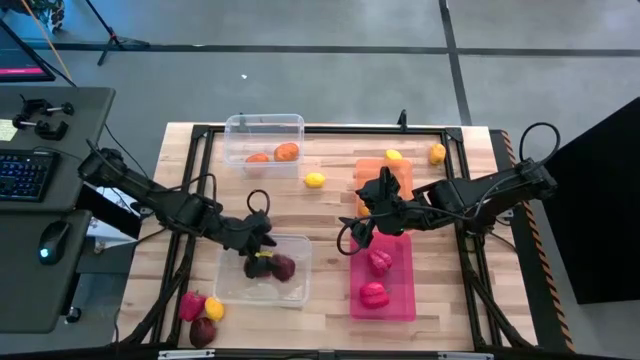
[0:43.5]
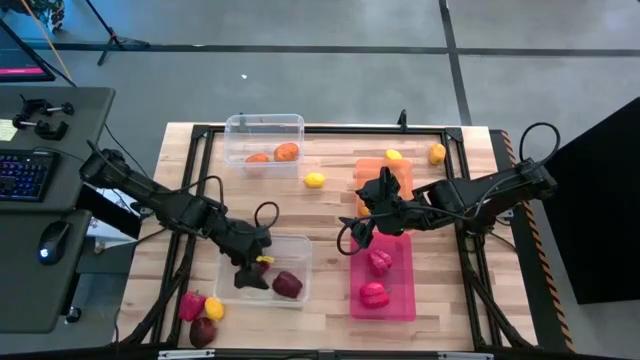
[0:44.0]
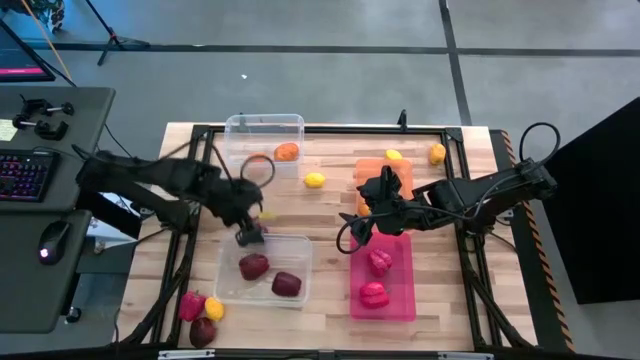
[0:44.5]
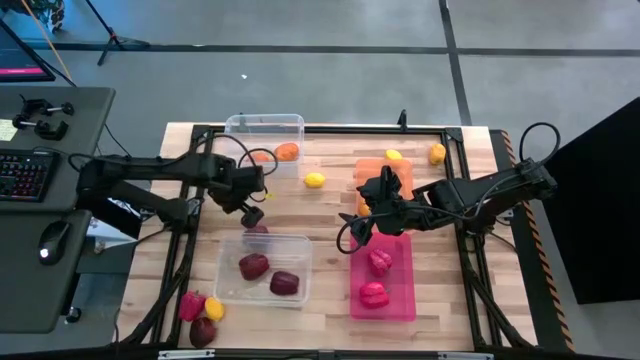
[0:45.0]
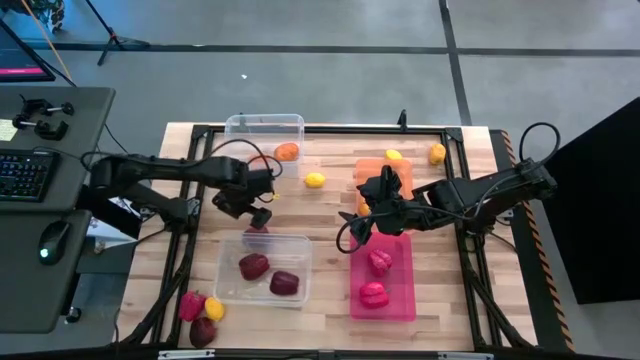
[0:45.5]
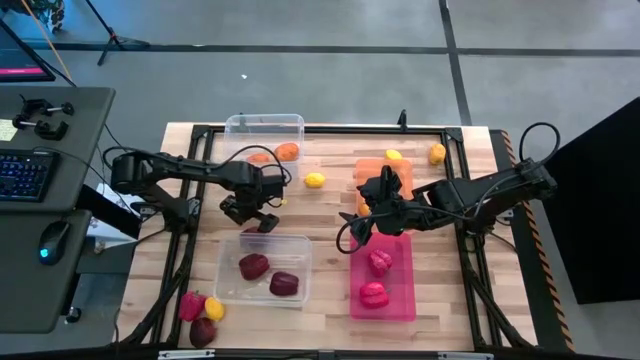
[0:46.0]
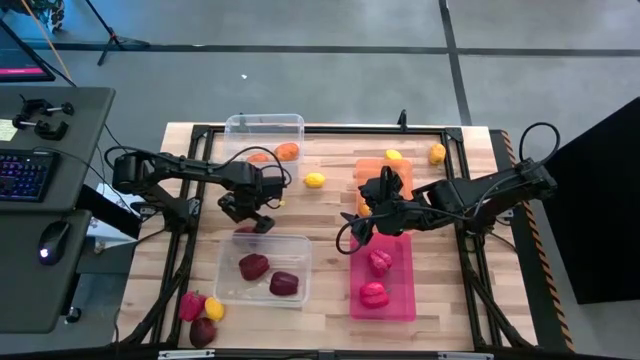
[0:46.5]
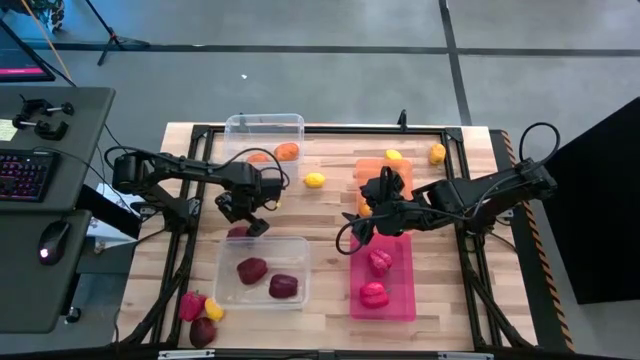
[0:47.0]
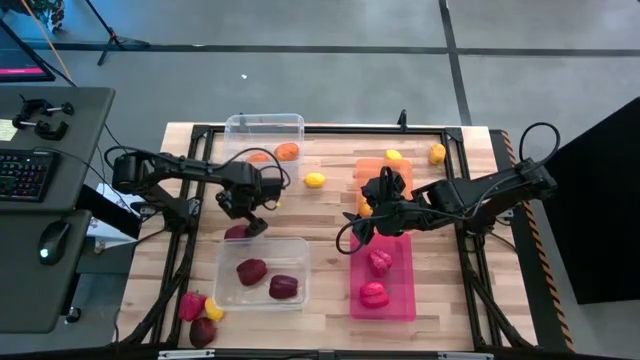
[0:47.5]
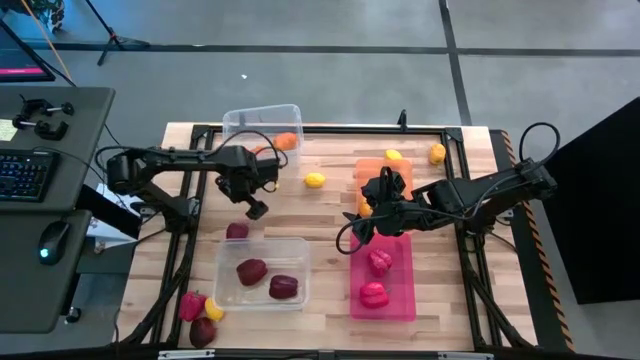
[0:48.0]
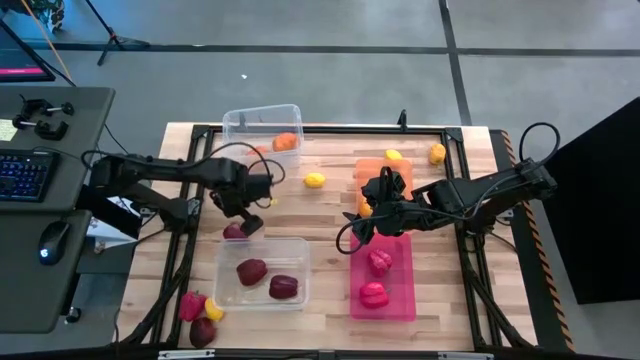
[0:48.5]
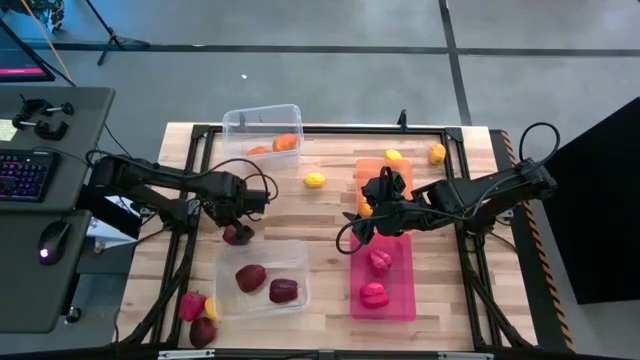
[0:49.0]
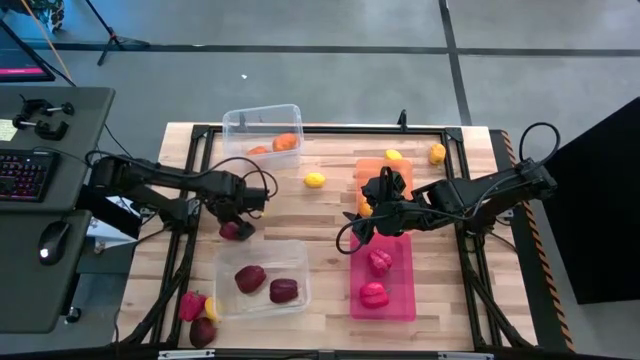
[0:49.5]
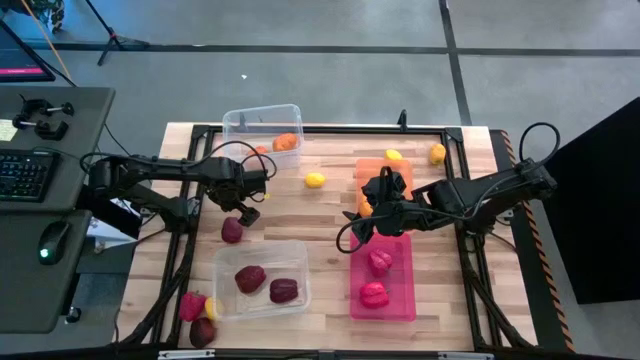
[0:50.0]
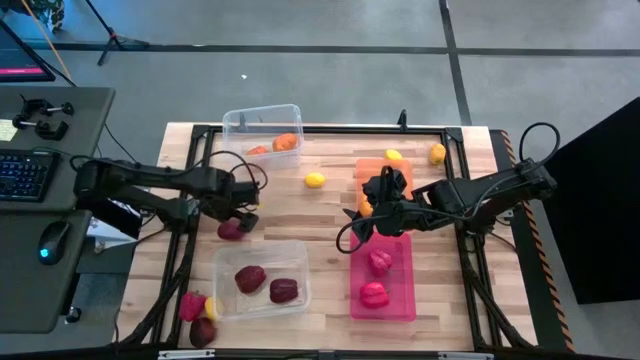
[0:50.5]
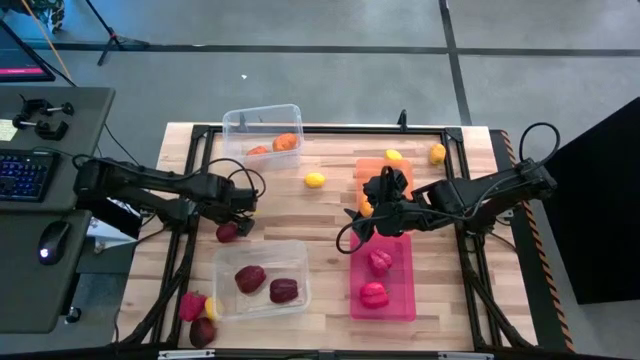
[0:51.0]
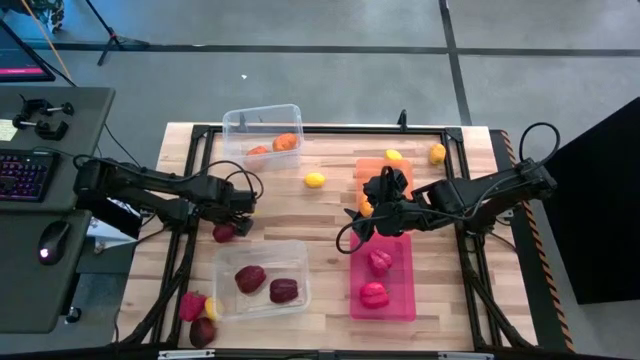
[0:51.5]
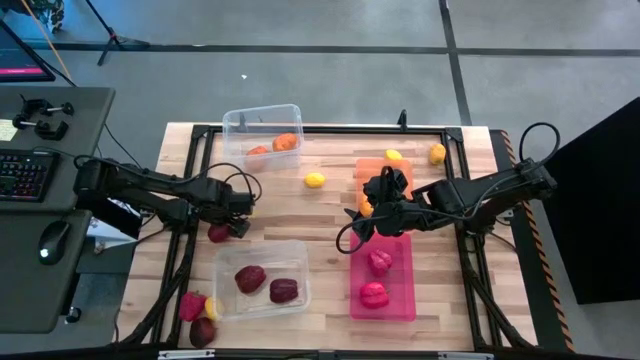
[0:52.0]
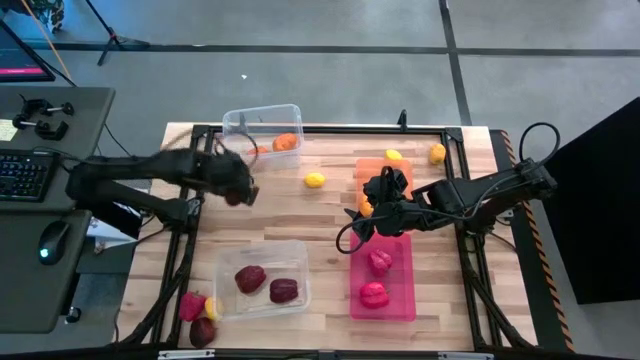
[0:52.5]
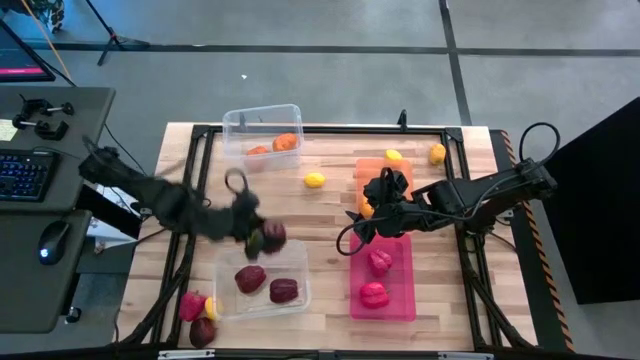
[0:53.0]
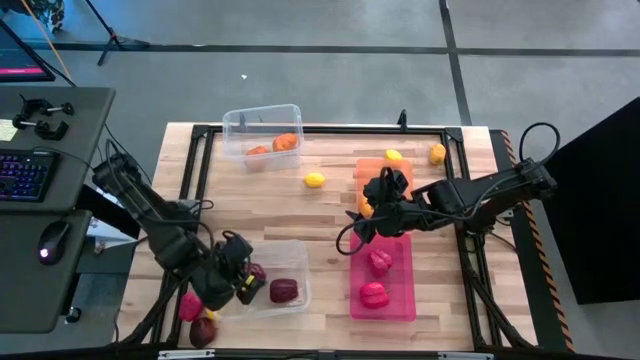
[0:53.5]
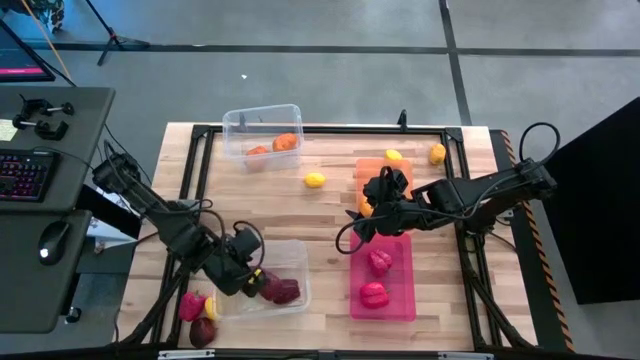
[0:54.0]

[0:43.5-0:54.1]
Task: Sort produce into baskets
Put the red apple into the bottom transparent bin

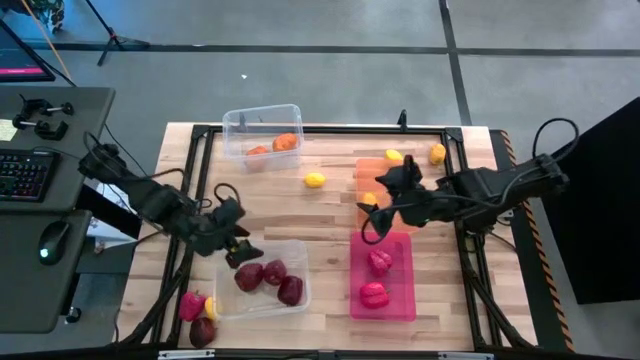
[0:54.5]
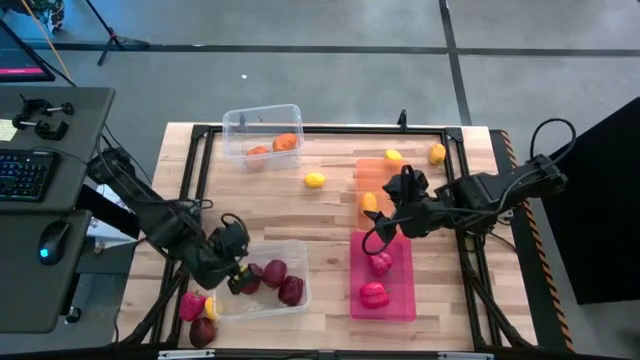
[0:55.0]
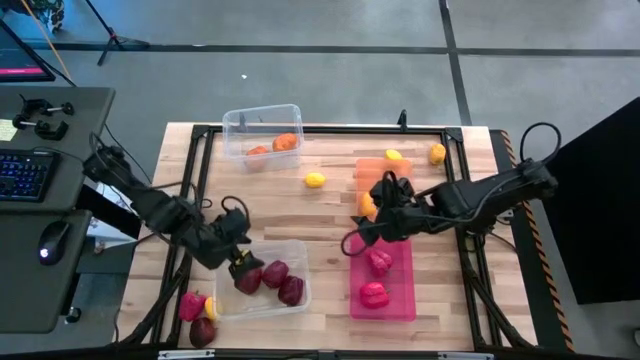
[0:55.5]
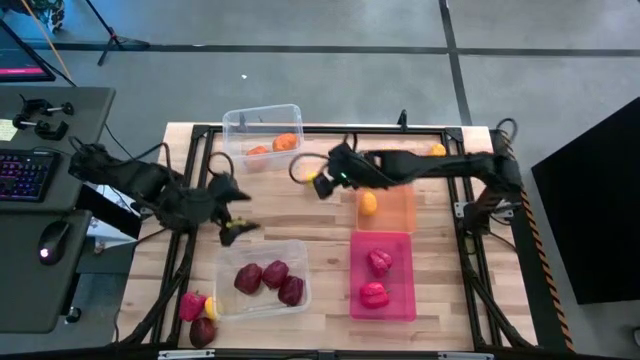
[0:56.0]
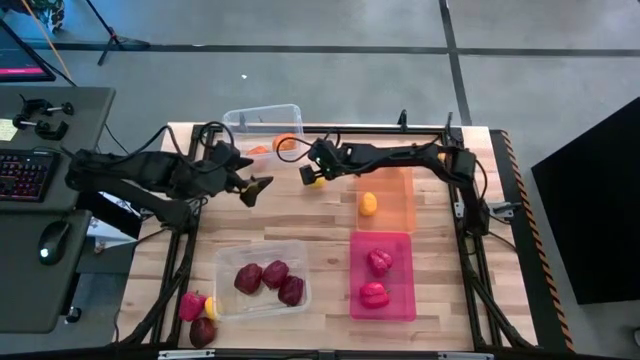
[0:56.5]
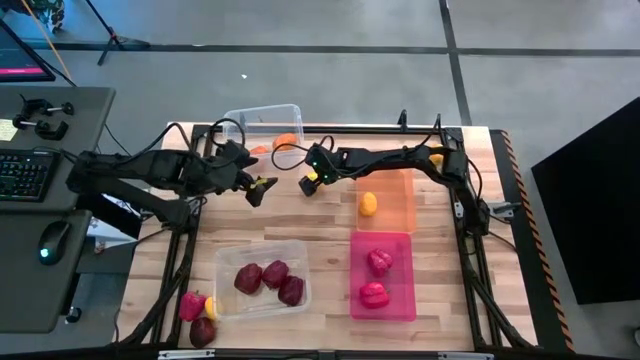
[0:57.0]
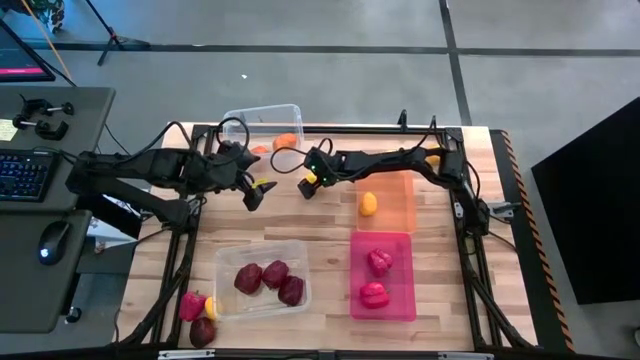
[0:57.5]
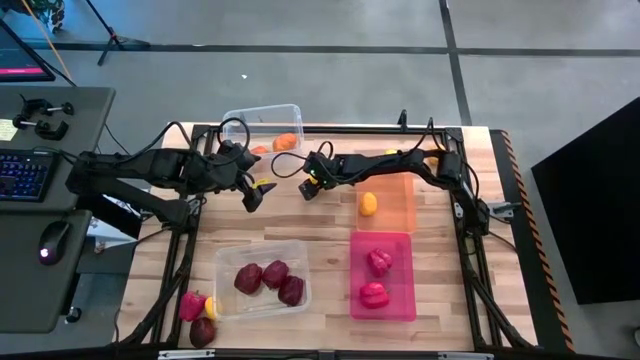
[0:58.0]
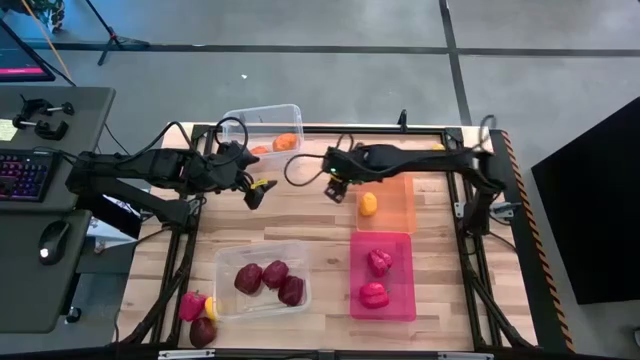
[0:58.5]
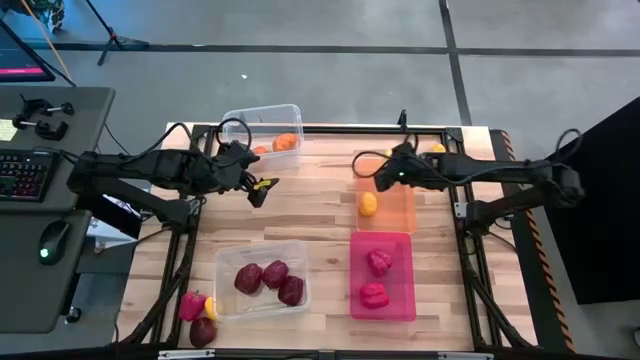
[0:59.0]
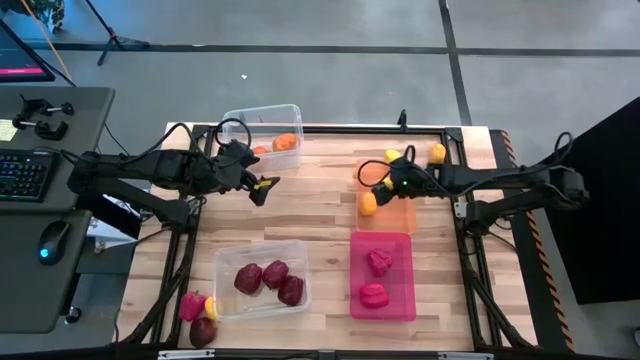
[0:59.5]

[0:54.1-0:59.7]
Put the yellow lemon into the orange bin

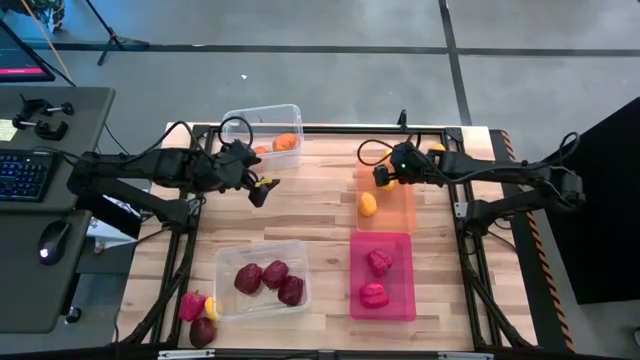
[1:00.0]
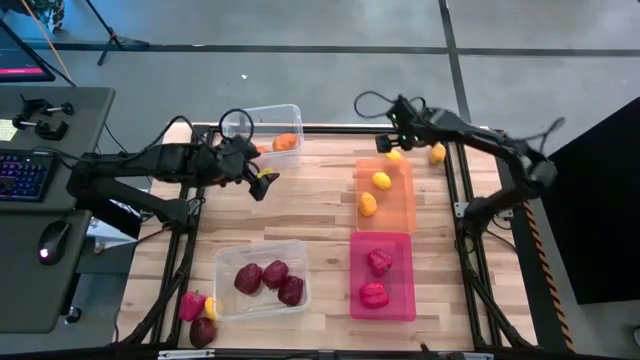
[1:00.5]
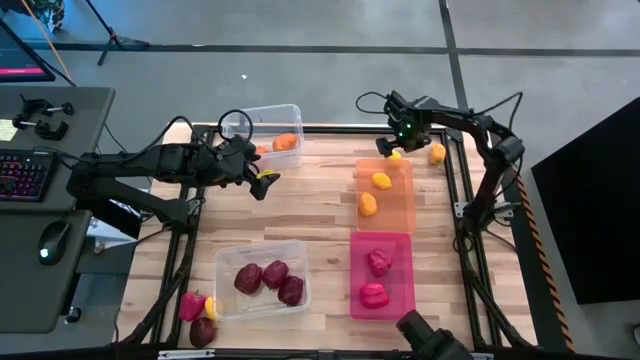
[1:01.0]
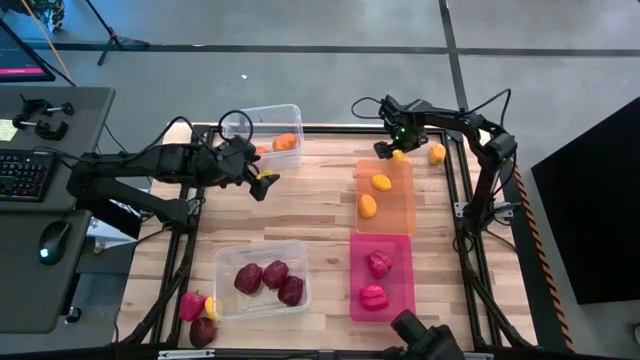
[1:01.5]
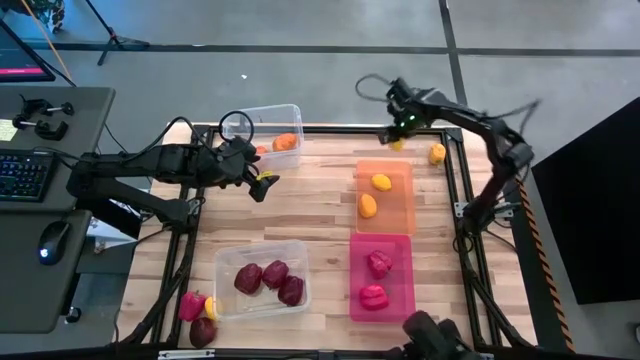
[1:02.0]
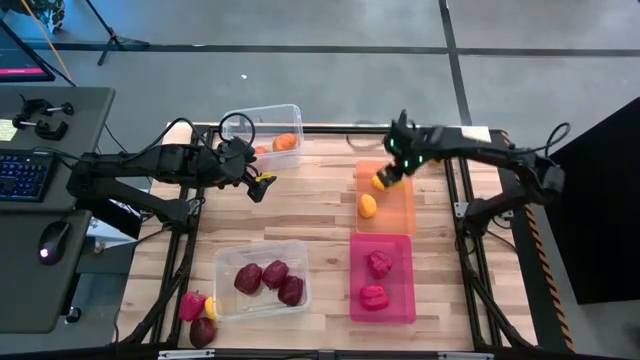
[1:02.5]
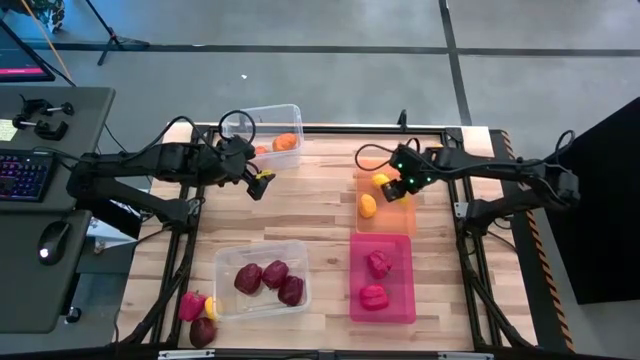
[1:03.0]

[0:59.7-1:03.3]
Put the yellow lemon into the orange bin

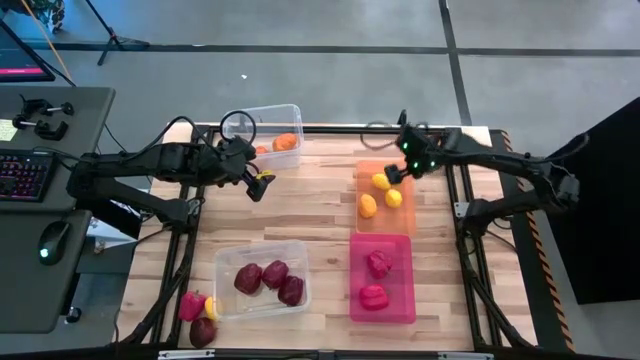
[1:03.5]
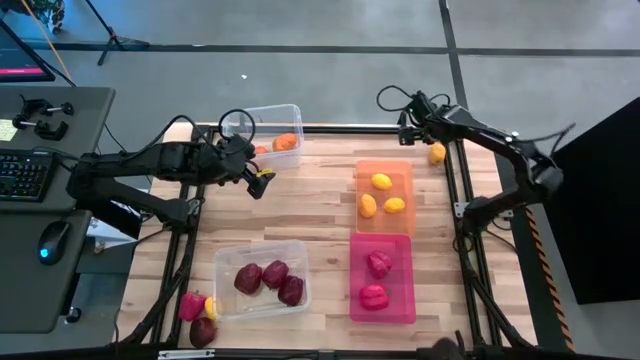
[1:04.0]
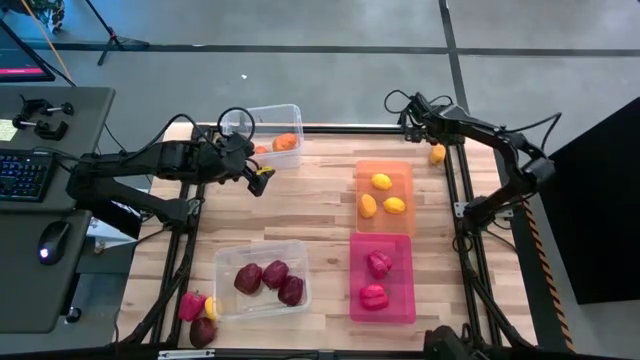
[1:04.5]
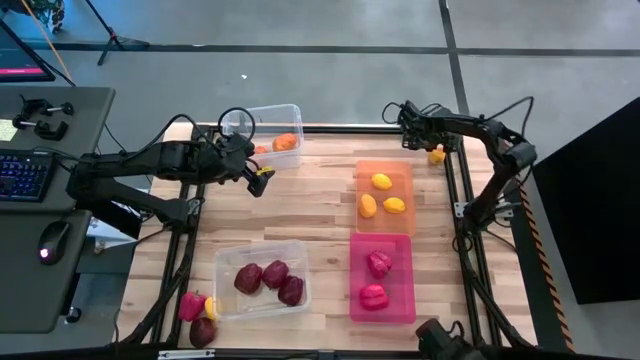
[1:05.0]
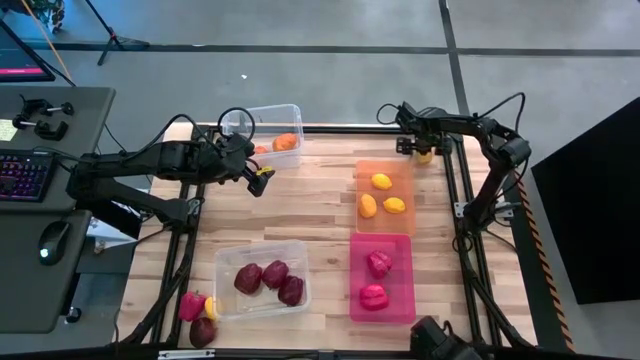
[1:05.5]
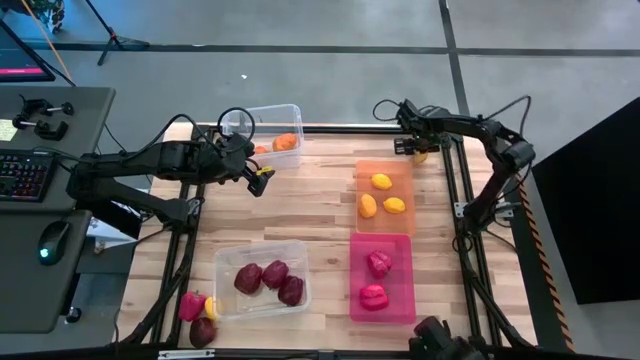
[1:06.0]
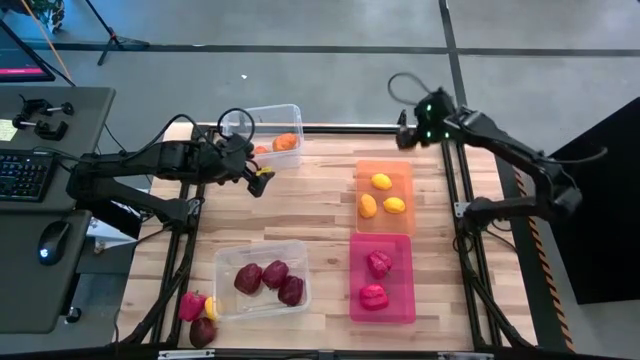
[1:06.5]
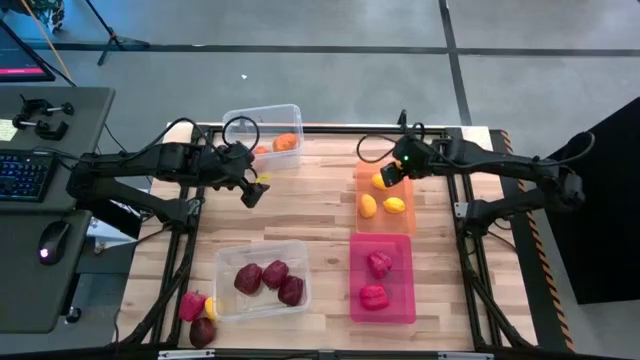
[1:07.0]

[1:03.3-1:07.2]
Put the yellow lemon into the orange bin
